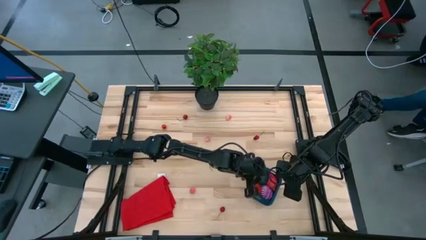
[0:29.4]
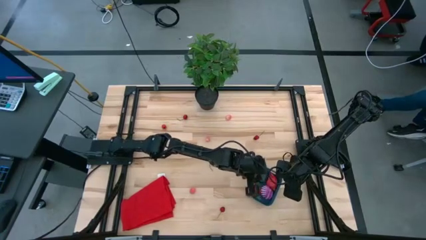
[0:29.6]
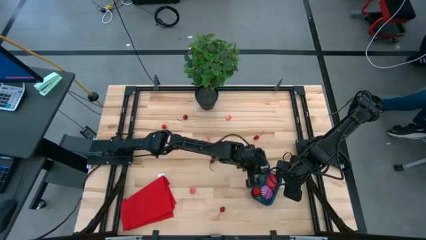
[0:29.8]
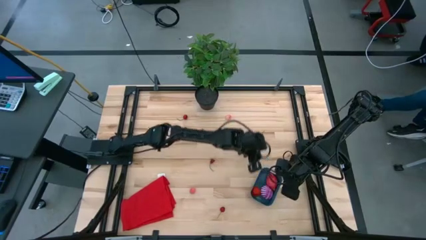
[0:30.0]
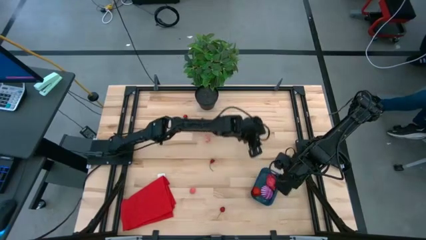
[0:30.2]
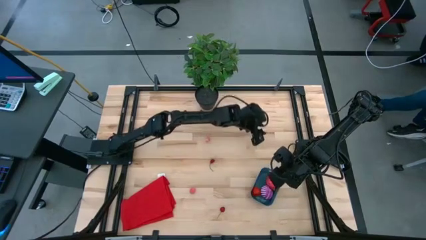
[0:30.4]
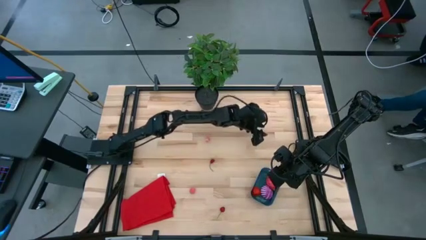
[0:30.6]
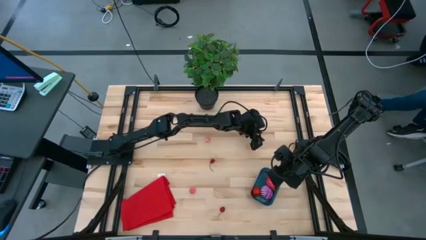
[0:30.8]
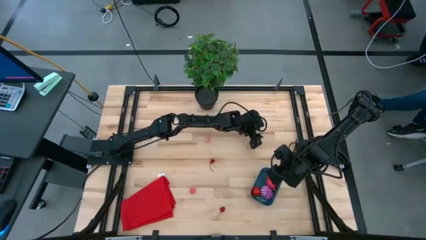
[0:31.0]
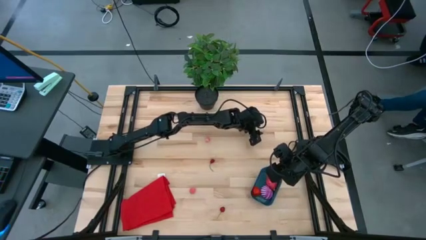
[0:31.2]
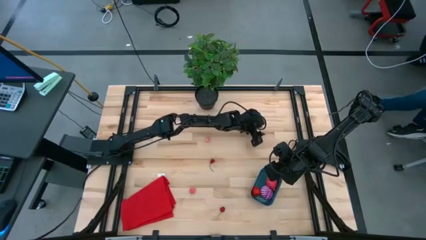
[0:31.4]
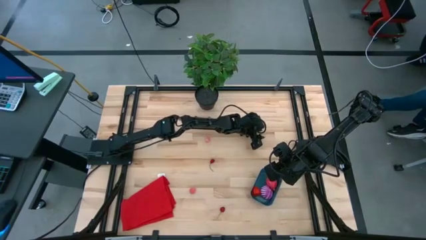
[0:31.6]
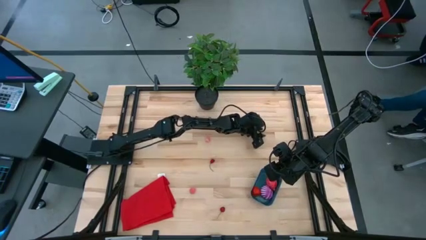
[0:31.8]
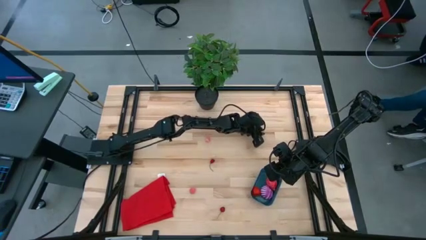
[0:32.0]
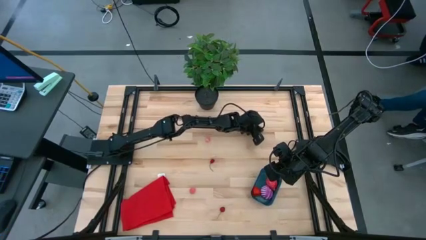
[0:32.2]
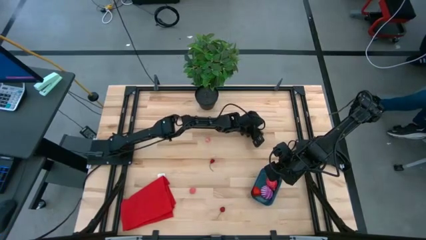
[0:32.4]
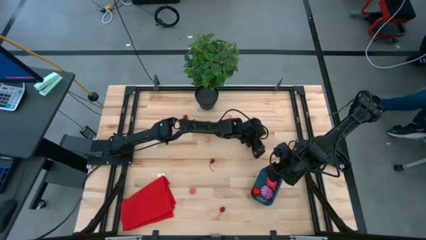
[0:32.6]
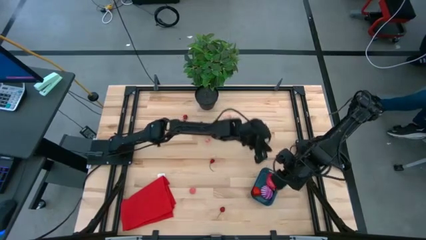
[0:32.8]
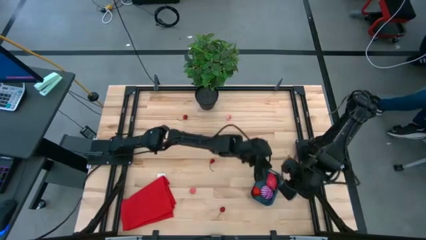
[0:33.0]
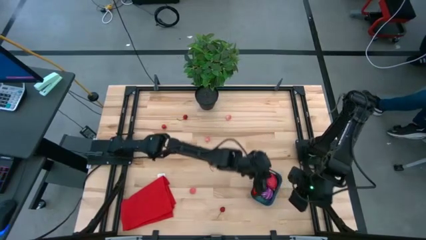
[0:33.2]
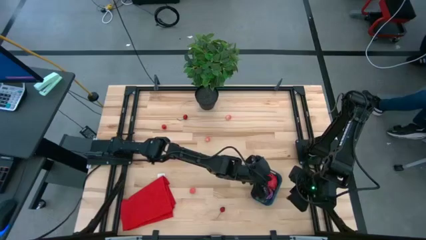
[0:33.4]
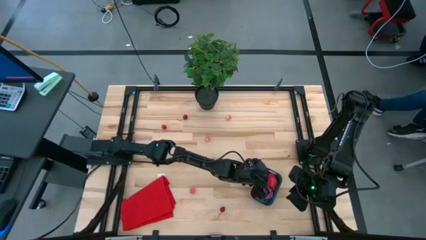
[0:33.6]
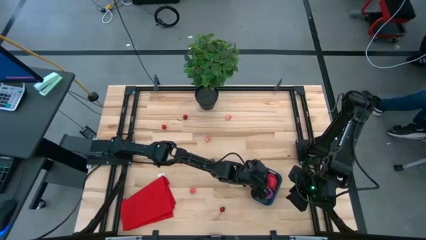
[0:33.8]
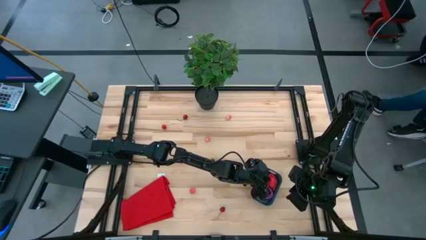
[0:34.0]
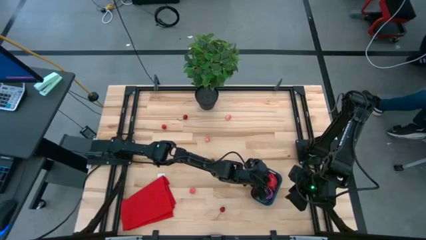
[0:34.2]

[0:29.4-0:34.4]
Task: Pick and placing Produce into tupperware
Put the cherry into the bin

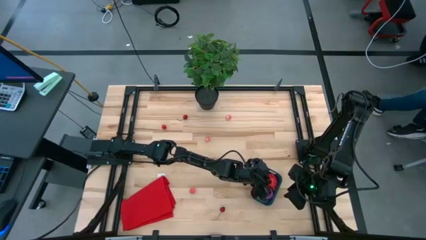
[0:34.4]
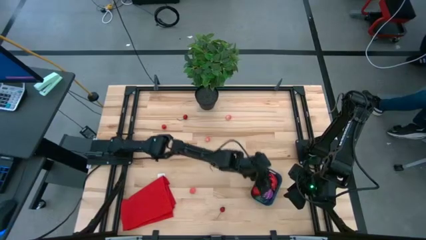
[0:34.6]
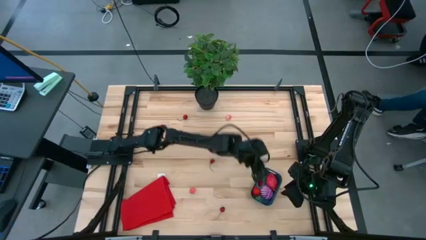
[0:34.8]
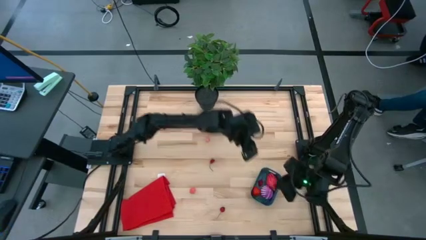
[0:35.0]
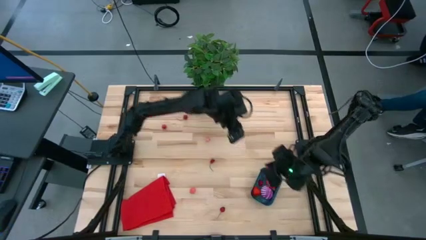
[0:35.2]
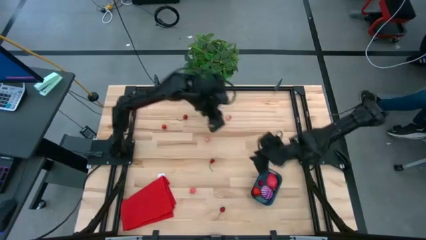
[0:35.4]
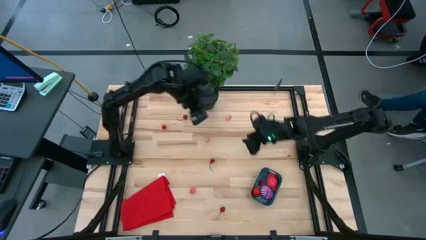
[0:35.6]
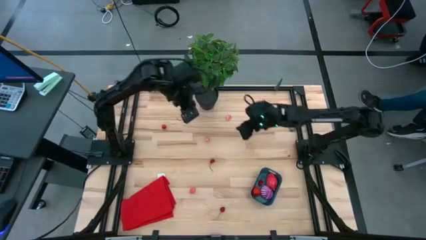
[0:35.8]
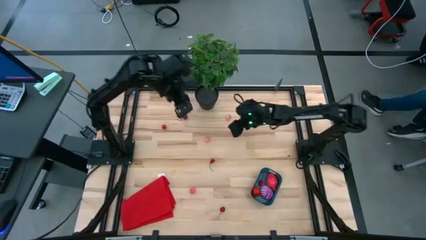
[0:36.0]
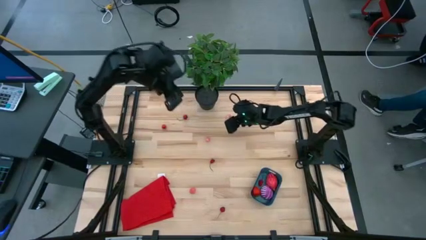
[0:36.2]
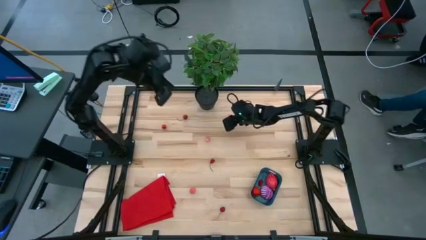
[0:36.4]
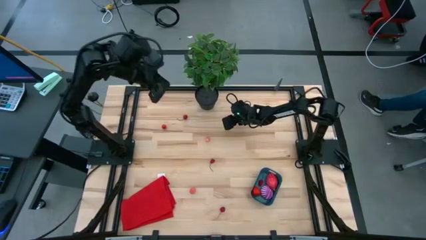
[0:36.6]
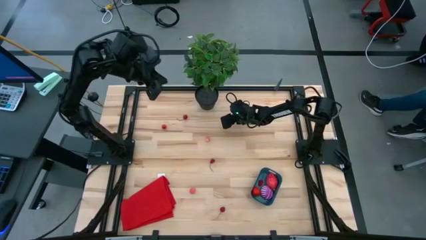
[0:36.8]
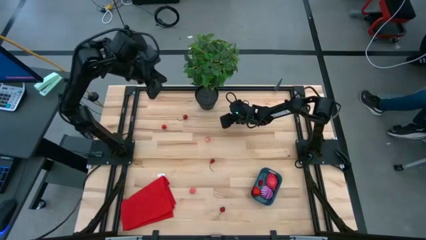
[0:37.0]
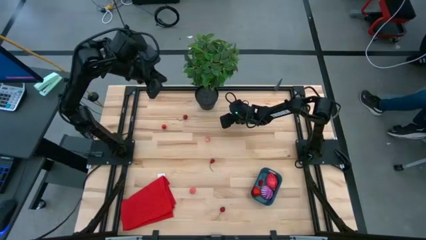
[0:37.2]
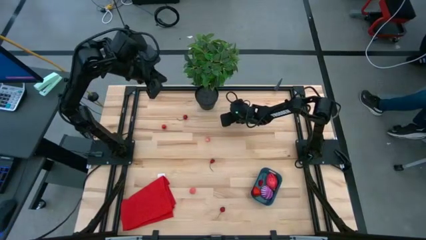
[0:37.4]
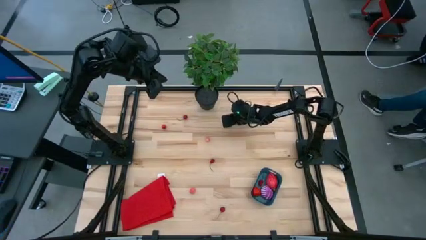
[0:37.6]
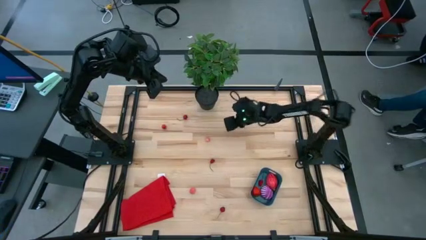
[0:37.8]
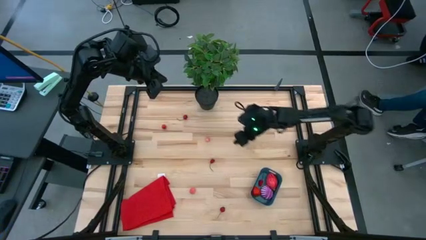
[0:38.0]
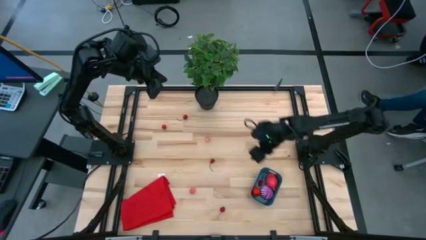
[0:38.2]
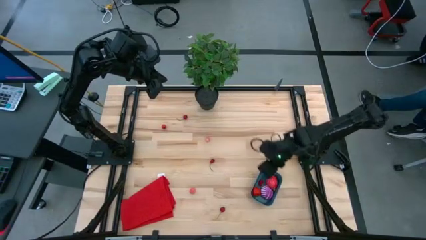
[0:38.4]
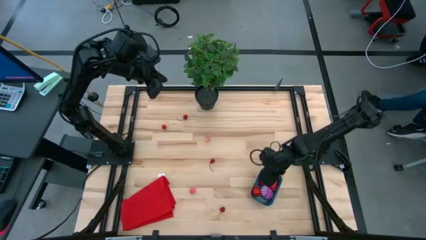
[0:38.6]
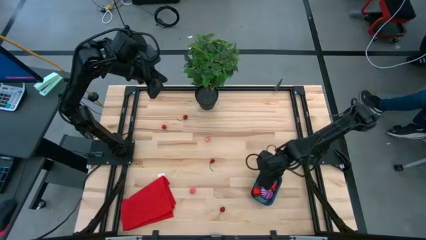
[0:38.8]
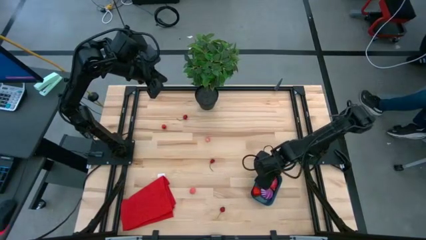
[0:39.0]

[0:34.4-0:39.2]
Put the top peach into the bin

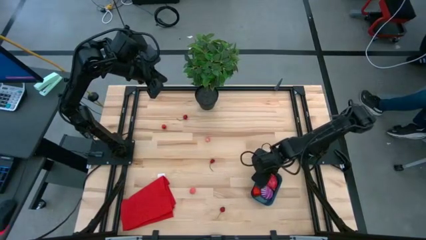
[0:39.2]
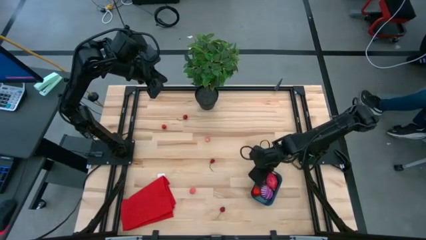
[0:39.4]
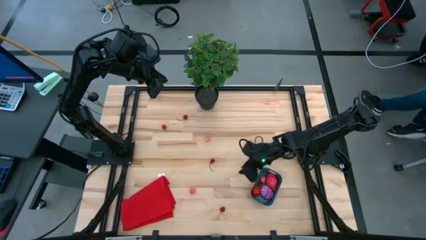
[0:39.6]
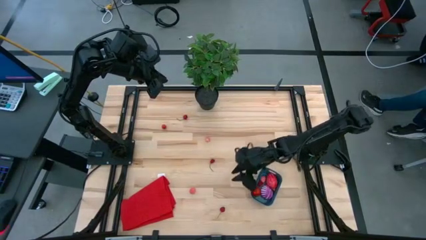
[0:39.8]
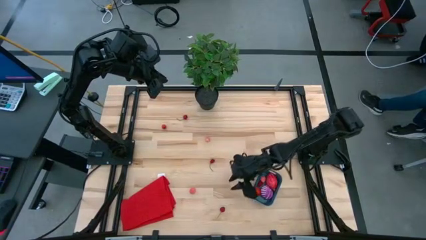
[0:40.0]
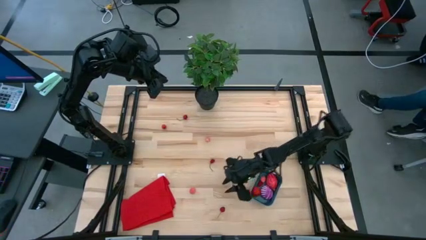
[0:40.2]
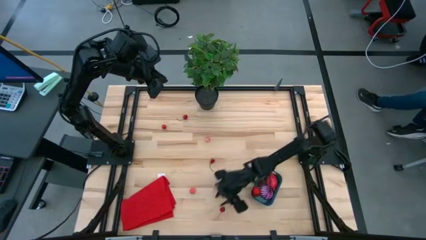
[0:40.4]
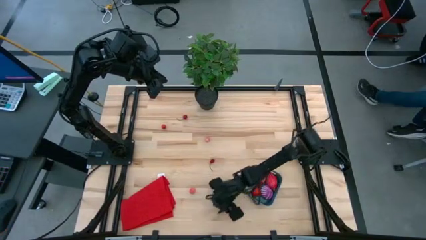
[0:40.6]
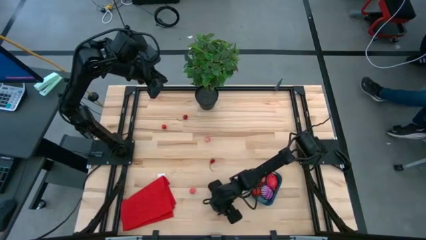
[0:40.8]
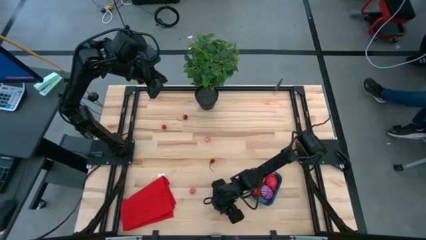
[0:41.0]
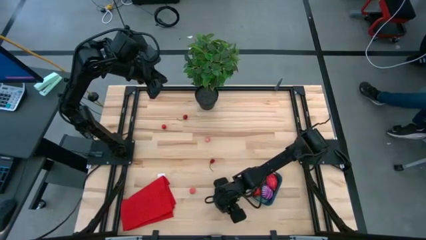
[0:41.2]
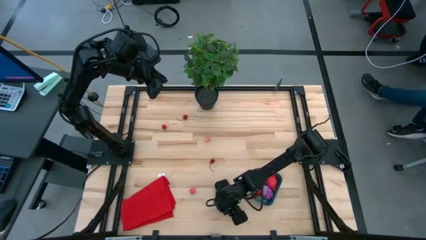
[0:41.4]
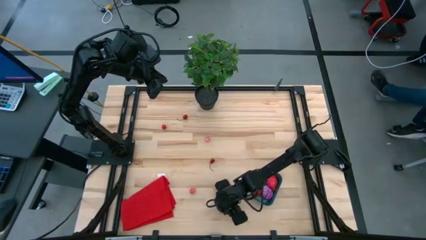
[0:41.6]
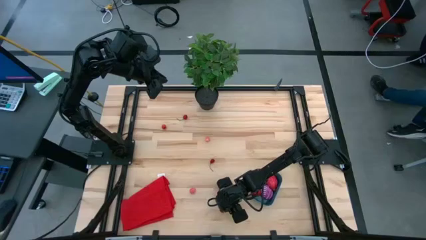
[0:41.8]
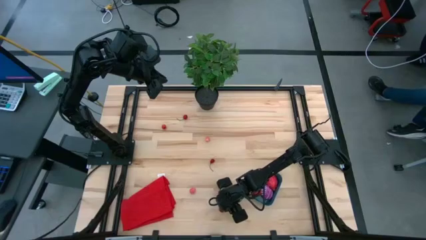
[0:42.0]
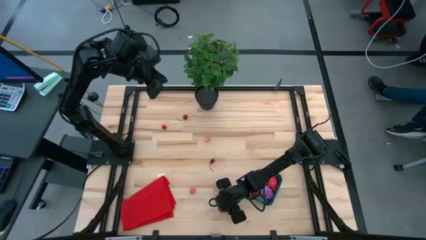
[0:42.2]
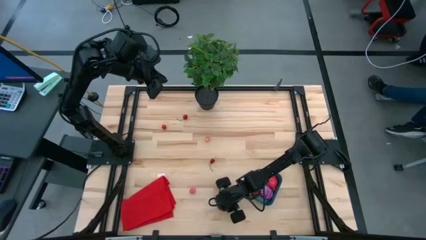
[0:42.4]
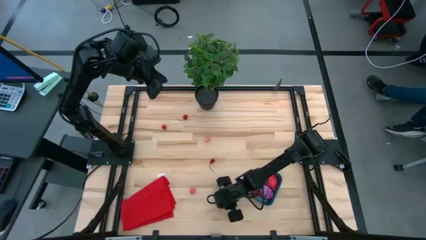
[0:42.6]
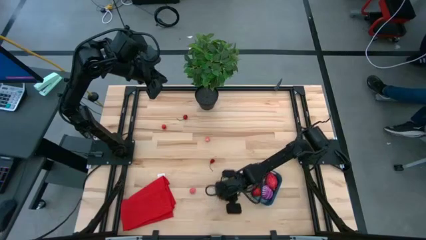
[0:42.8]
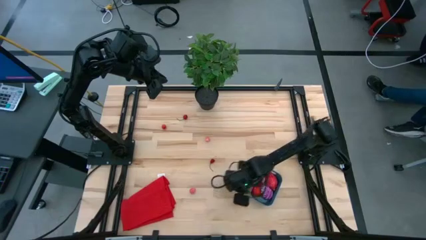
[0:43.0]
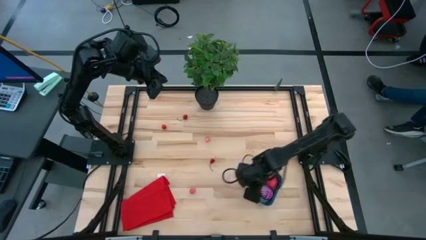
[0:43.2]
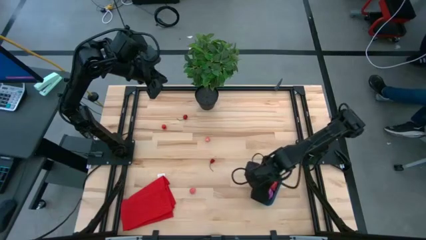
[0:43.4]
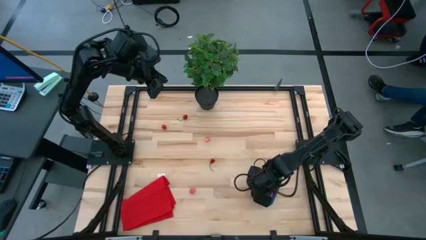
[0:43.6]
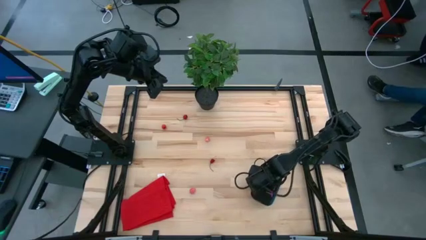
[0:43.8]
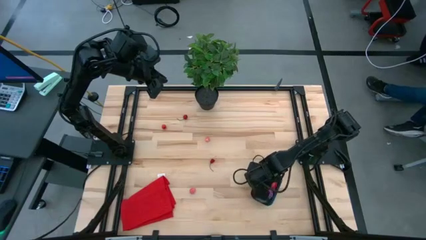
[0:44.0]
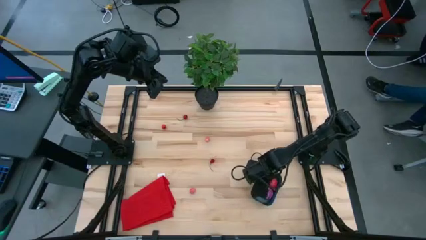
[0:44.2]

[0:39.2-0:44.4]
Put the cherry into the bin

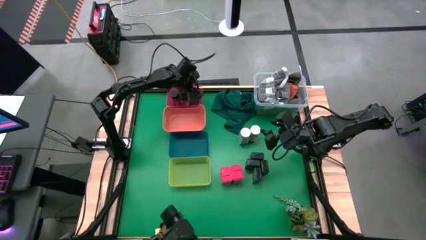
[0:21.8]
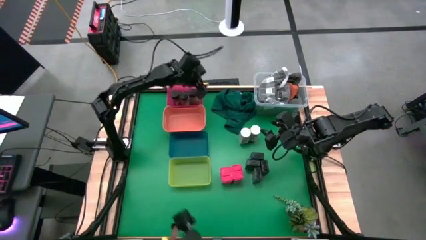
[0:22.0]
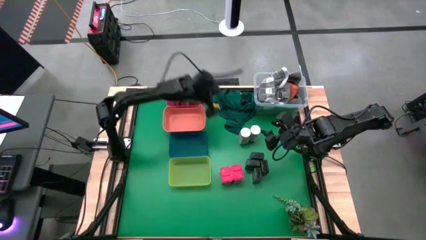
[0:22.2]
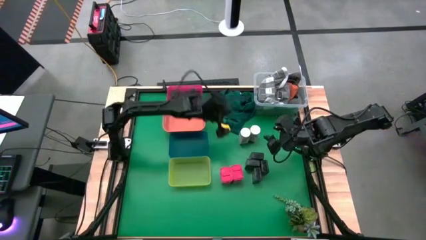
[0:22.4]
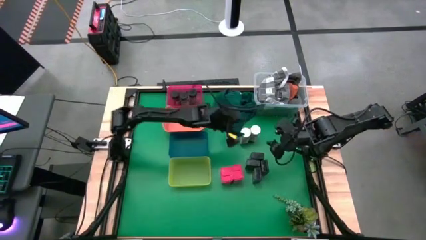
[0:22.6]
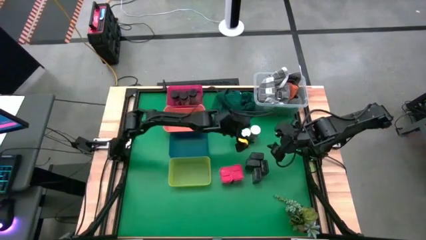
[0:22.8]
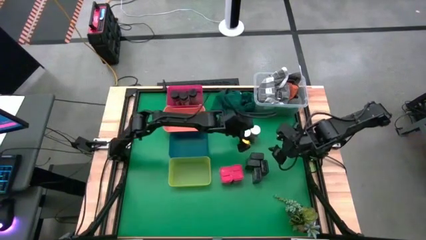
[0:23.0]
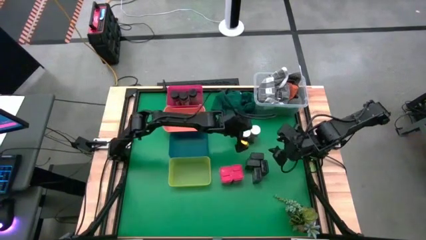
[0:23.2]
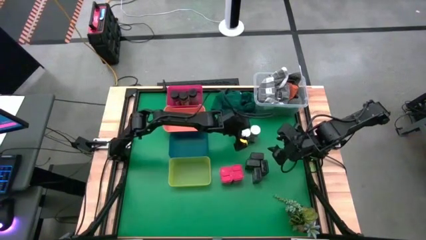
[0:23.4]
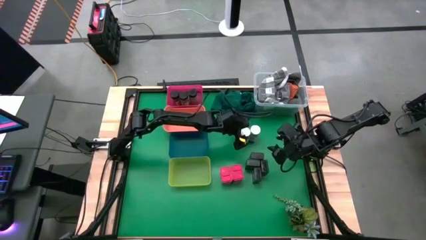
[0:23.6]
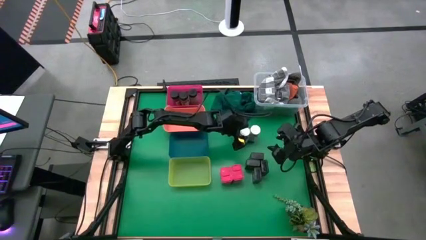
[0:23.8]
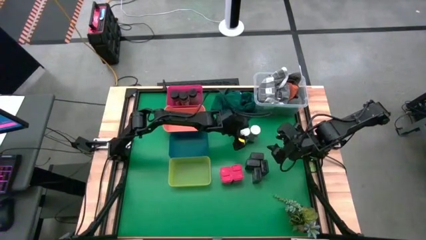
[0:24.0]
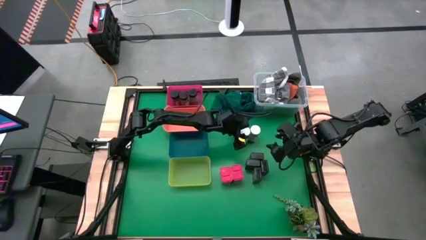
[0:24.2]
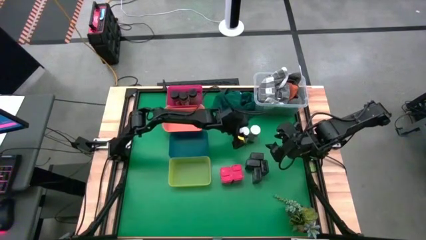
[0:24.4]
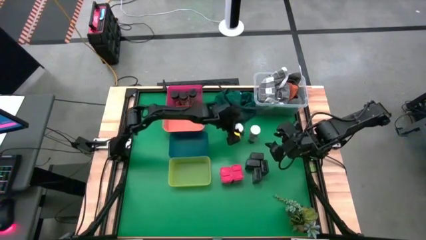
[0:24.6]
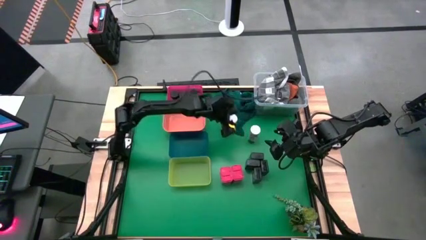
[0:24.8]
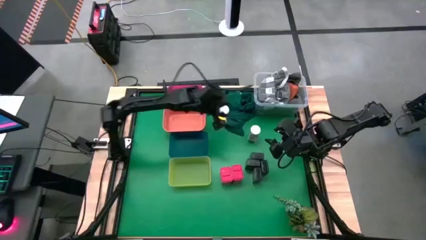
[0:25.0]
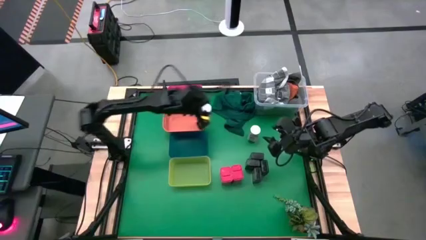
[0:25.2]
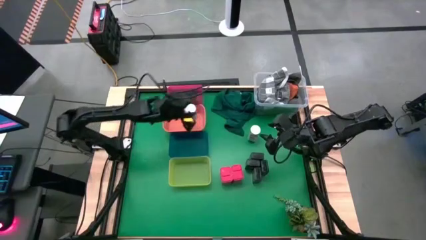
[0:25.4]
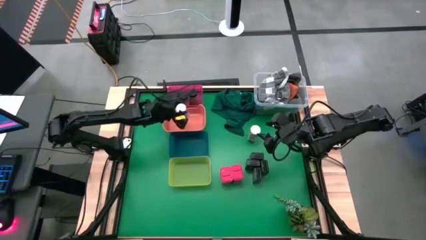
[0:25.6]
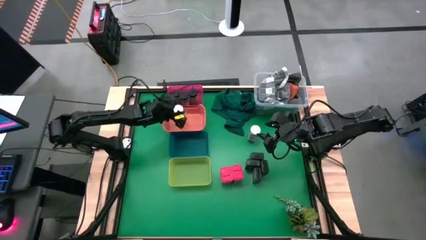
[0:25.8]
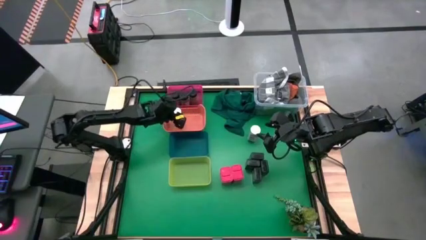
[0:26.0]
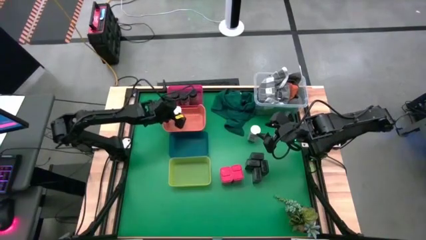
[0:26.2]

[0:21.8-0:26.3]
Task: Sort spices by type
Put the left white spice bottle into the orange bin
